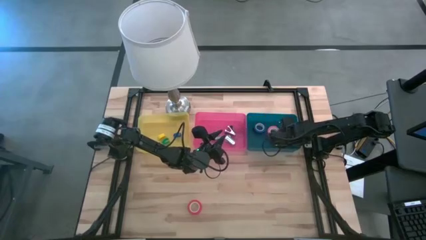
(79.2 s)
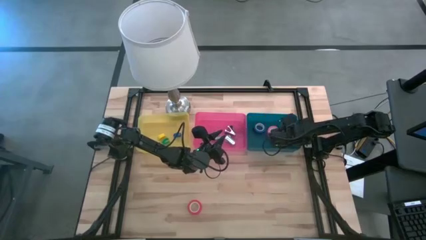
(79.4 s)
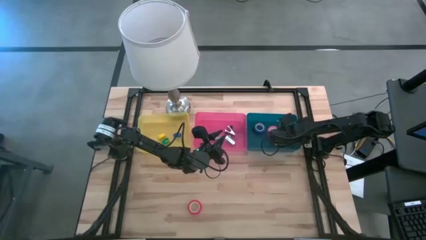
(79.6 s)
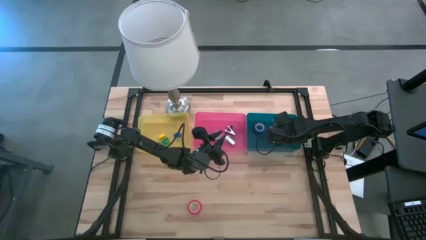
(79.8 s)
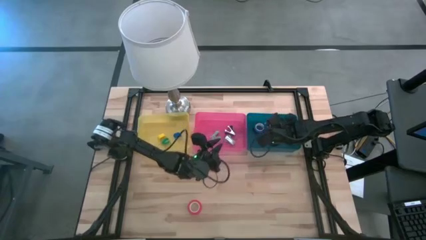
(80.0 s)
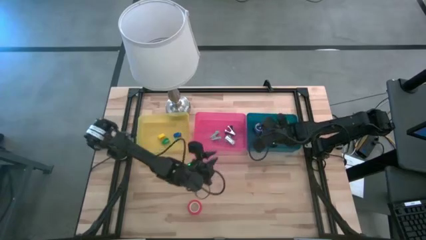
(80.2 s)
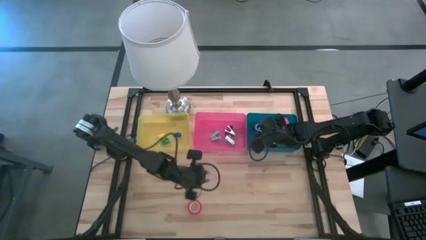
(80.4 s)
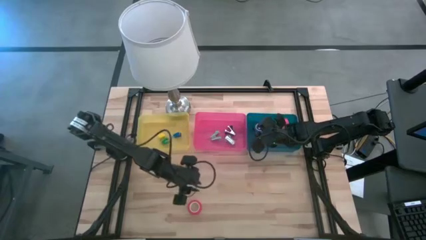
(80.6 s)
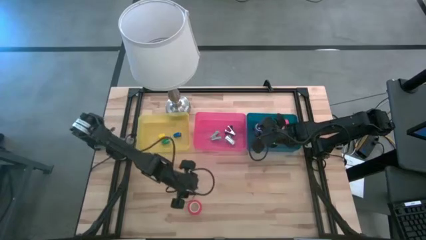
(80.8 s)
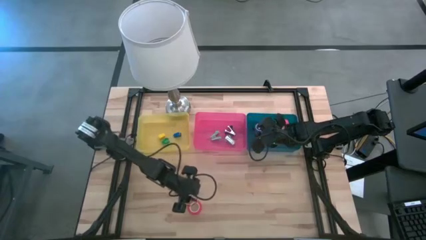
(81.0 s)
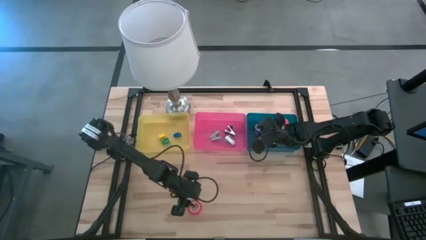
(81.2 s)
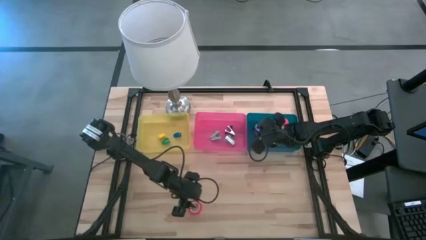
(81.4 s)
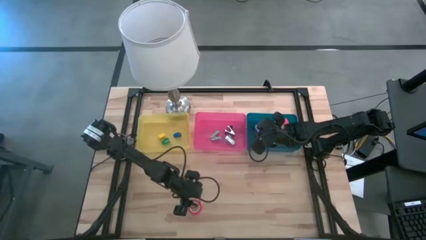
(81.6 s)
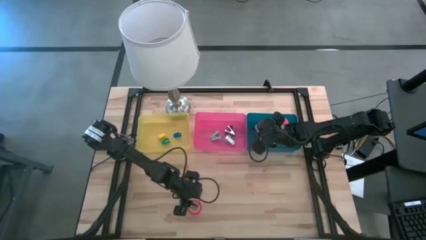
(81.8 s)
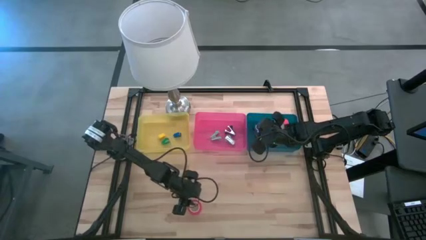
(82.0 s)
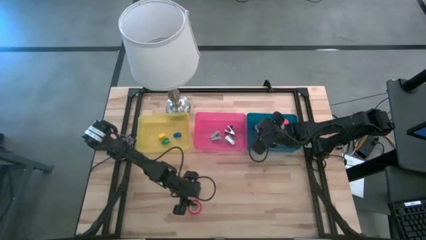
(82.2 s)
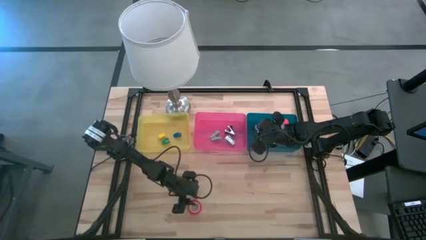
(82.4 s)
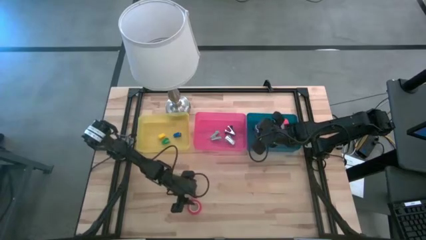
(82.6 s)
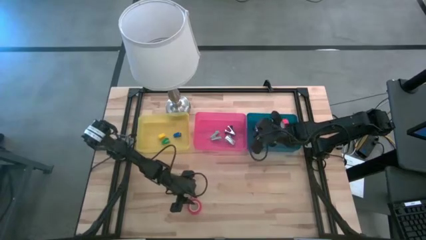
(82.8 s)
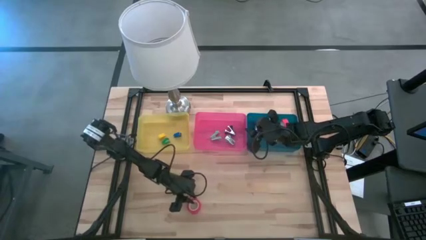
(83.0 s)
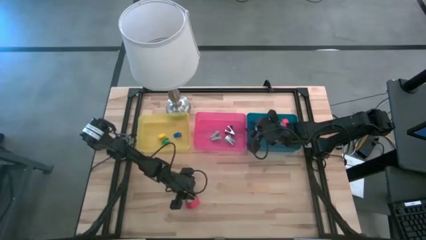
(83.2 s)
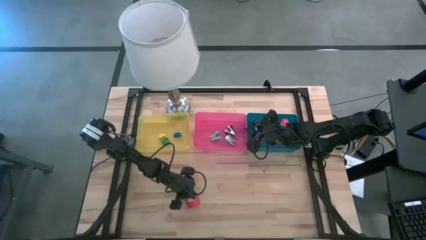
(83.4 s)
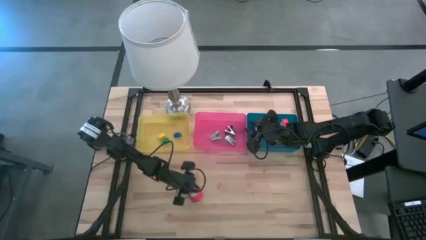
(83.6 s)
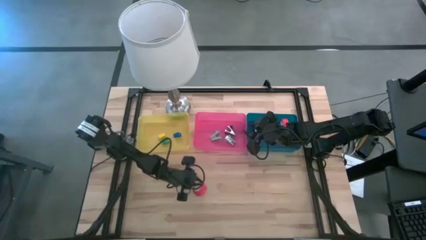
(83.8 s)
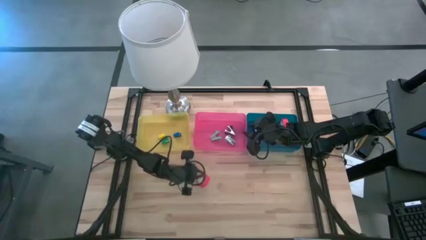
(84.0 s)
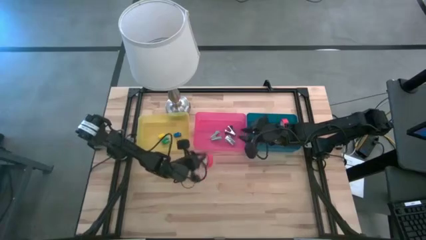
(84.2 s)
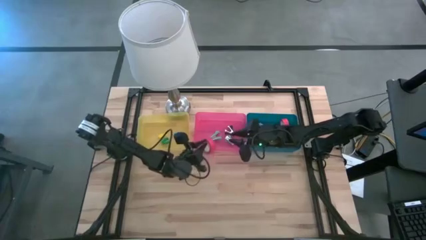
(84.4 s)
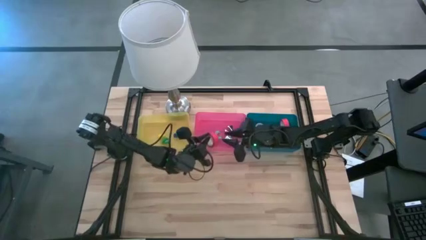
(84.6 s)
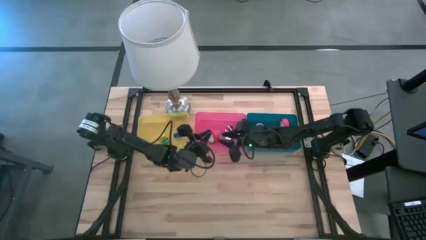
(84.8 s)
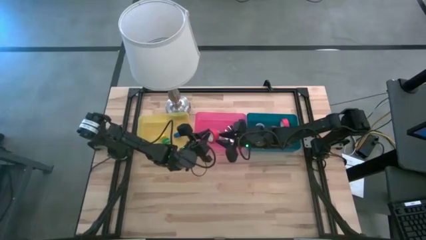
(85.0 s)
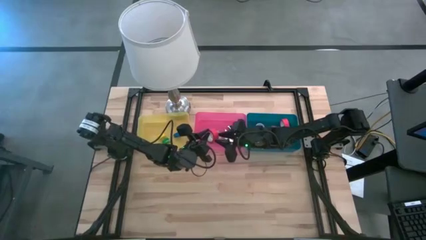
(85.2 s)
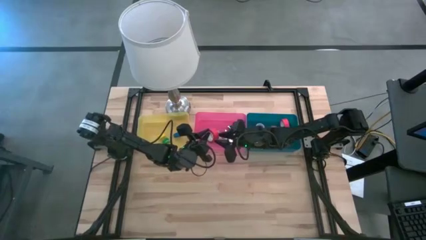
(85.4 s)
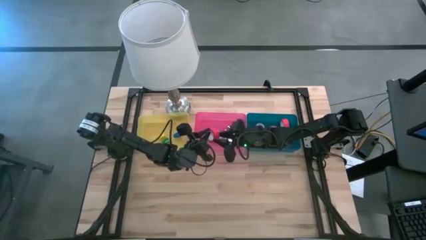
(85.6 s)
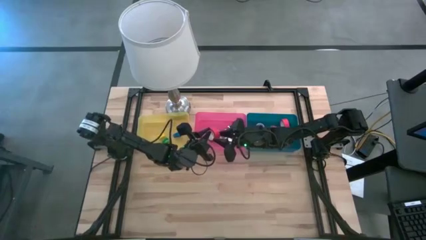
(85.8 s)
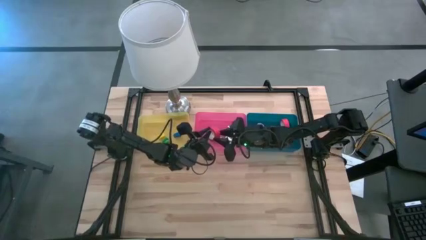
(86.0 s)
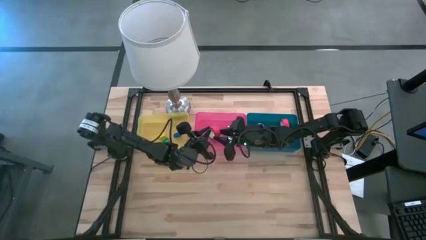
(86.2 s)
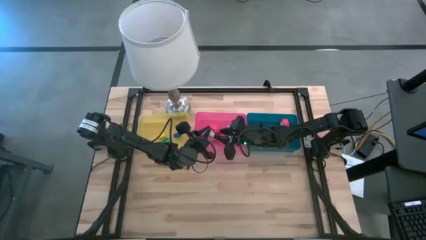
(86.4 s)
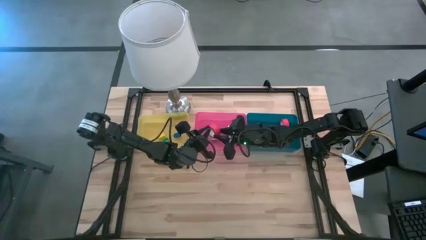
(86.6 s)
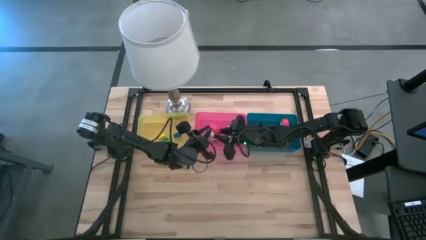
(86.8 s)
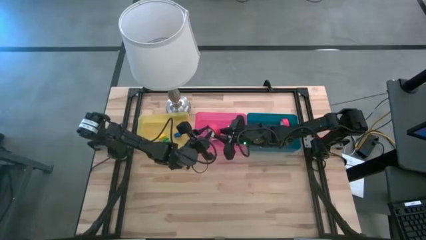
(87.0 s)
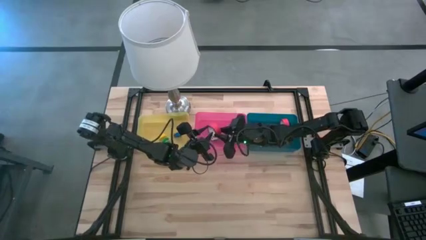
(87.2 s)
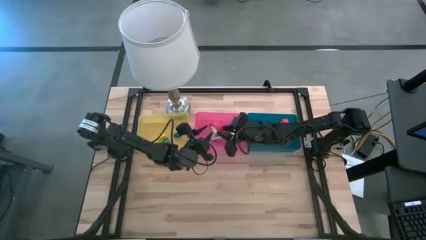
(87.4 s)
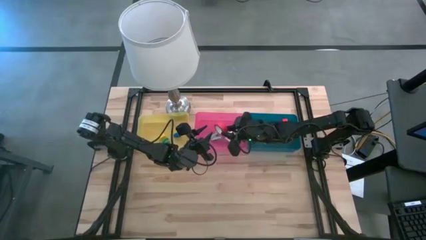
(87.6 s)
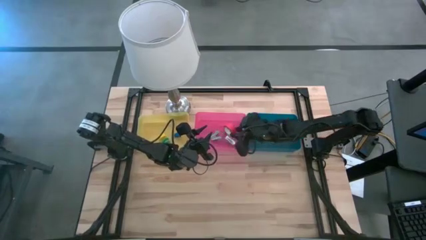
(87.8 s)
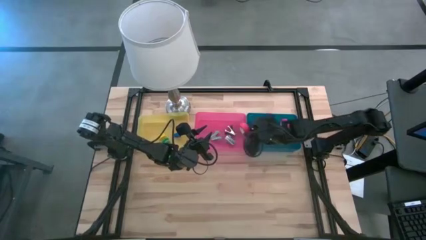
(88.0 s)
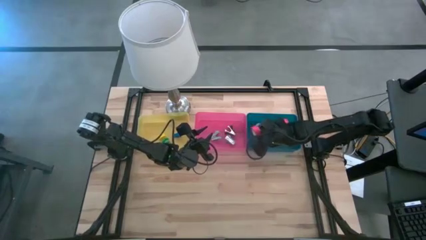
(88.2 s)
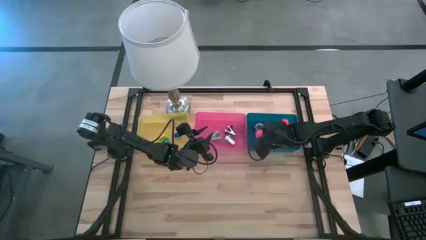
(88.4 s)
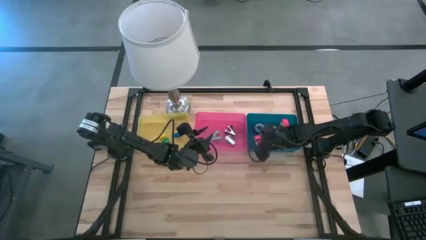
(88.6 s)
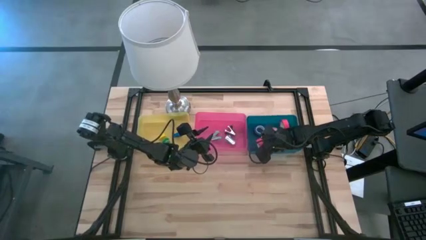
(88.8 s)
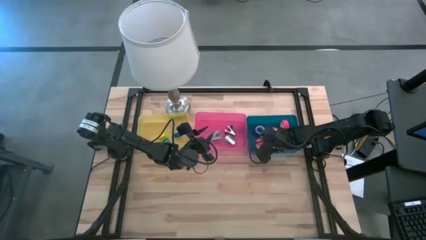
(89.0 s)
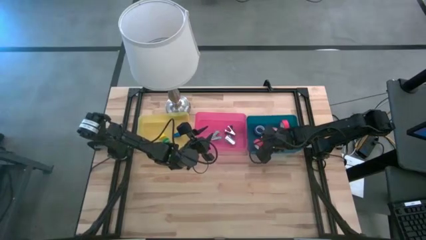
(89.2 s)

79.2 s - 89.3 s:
Task: Pick and place Stapler, Stapler remover, tape
Put the orange tape into the blue bin

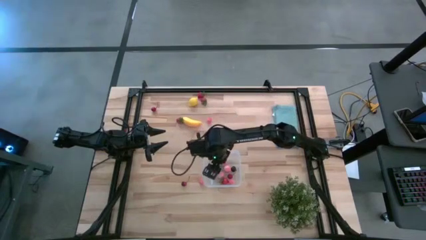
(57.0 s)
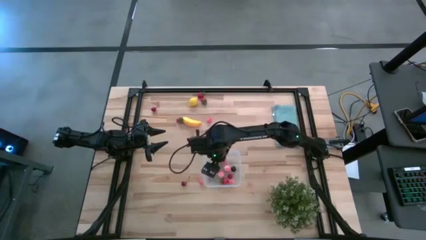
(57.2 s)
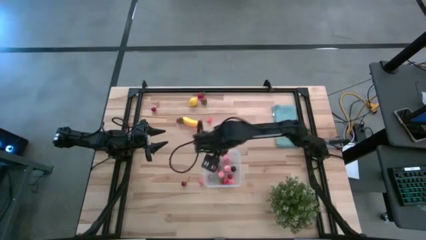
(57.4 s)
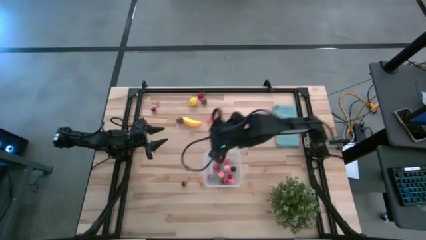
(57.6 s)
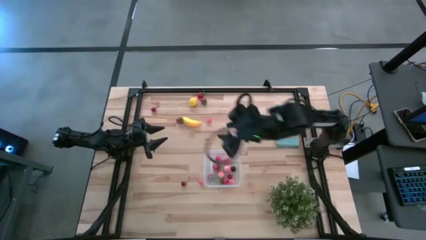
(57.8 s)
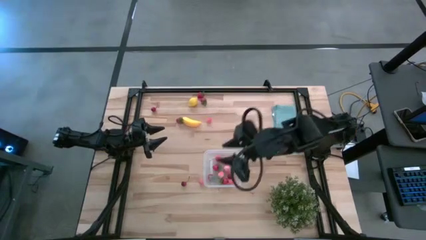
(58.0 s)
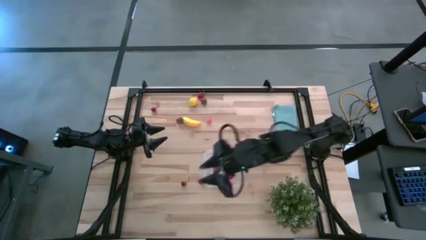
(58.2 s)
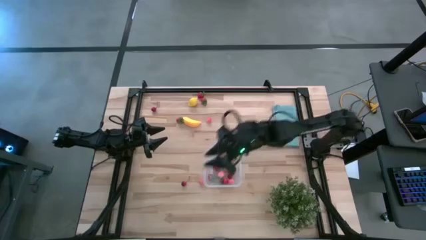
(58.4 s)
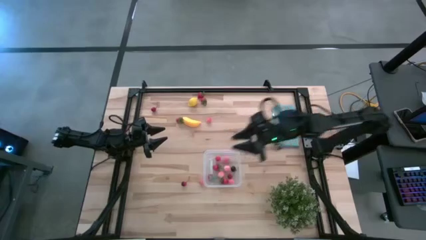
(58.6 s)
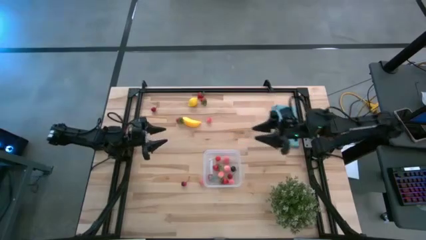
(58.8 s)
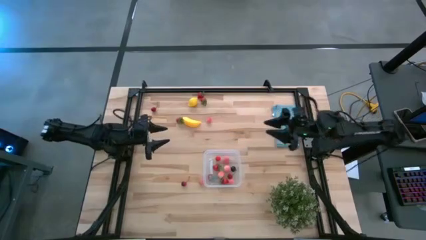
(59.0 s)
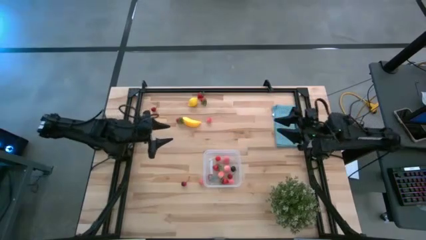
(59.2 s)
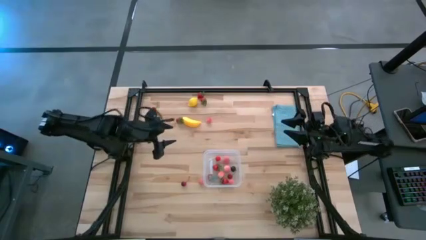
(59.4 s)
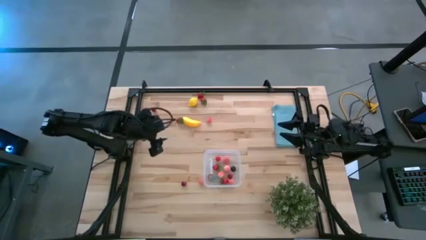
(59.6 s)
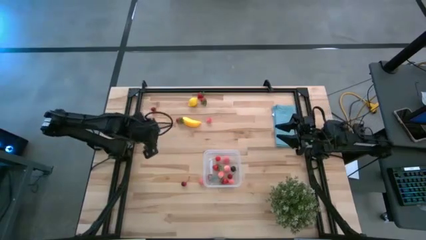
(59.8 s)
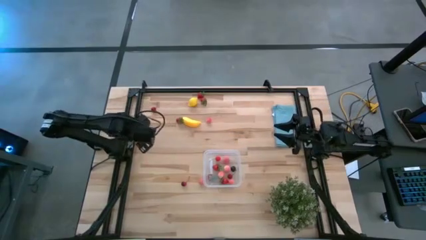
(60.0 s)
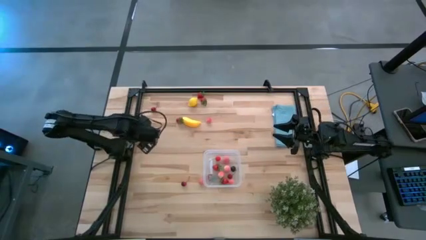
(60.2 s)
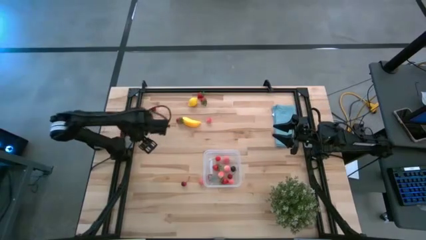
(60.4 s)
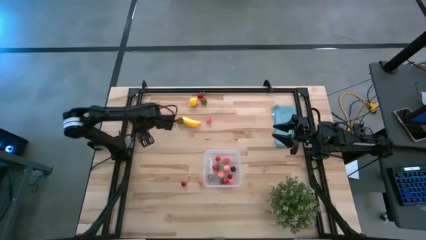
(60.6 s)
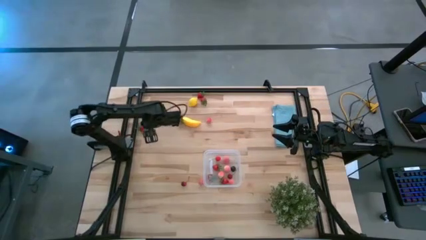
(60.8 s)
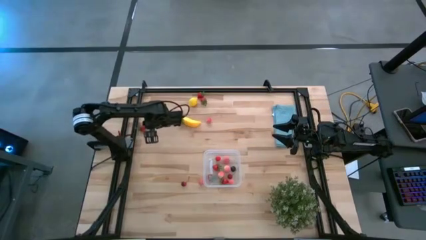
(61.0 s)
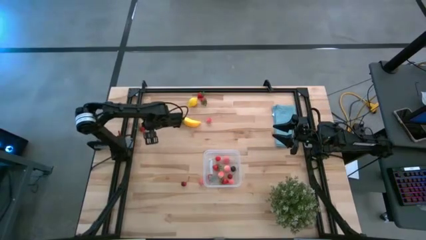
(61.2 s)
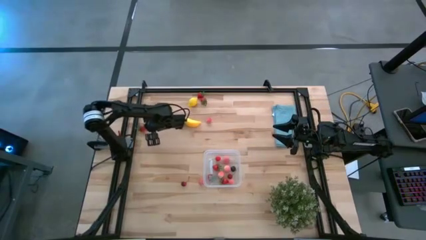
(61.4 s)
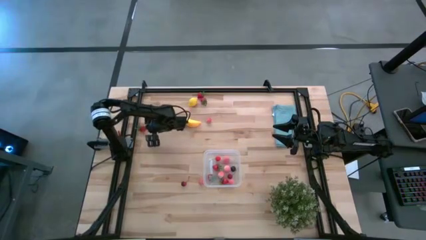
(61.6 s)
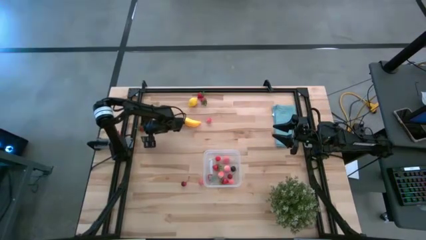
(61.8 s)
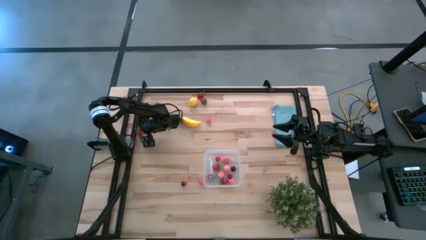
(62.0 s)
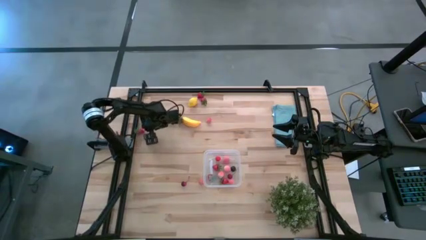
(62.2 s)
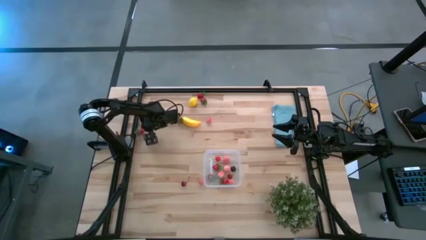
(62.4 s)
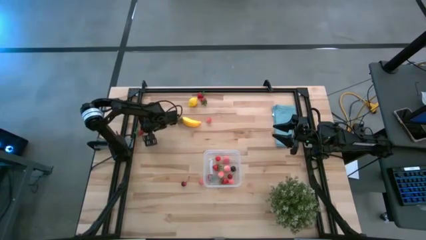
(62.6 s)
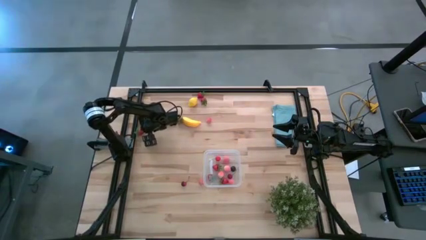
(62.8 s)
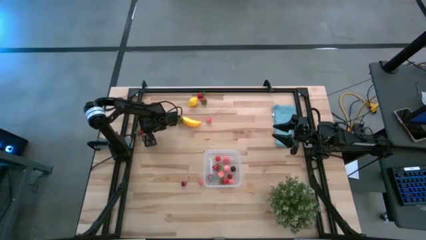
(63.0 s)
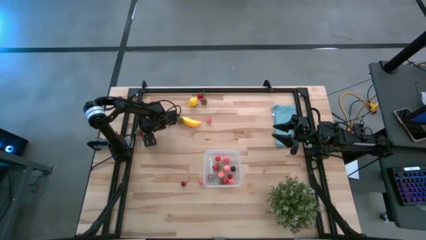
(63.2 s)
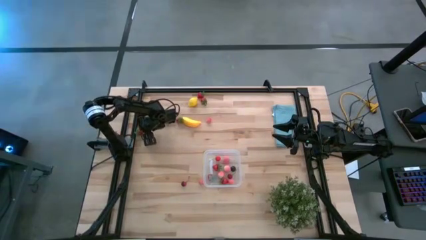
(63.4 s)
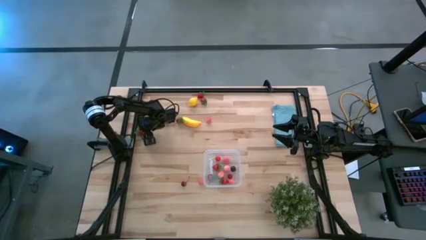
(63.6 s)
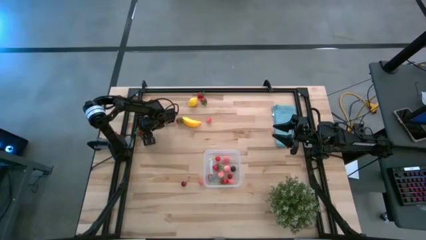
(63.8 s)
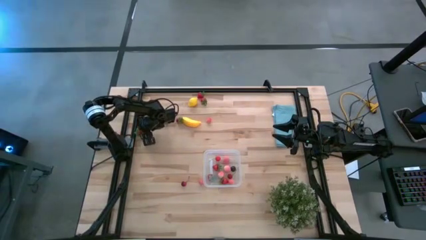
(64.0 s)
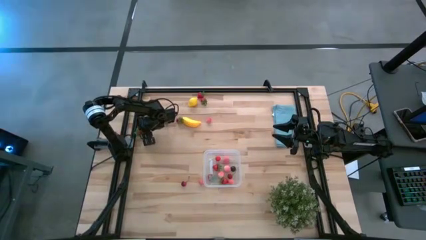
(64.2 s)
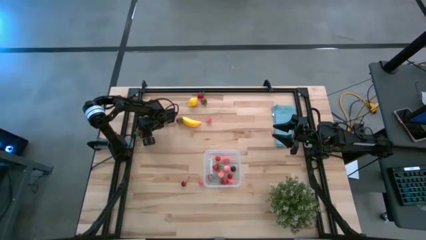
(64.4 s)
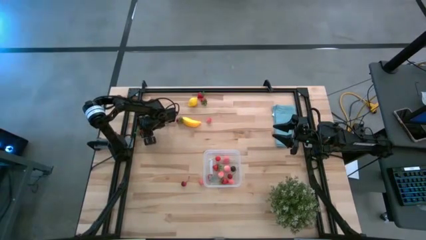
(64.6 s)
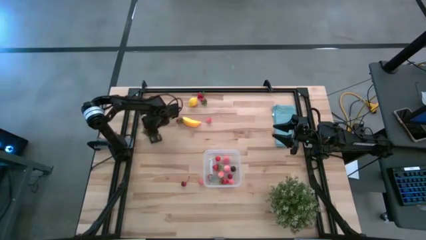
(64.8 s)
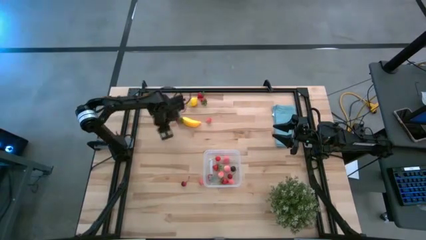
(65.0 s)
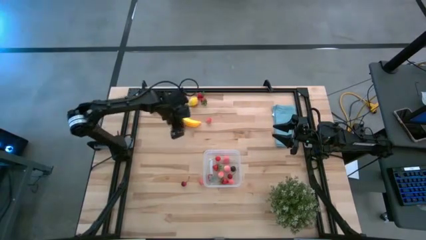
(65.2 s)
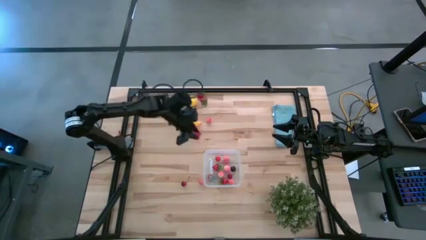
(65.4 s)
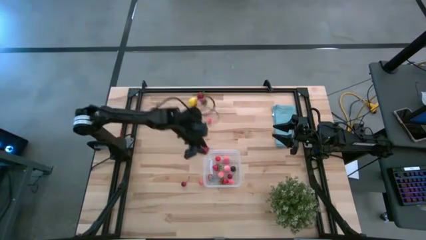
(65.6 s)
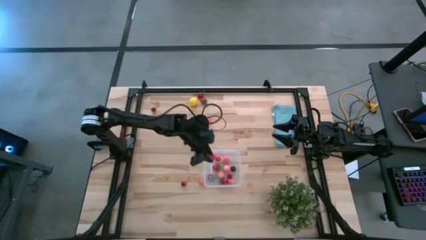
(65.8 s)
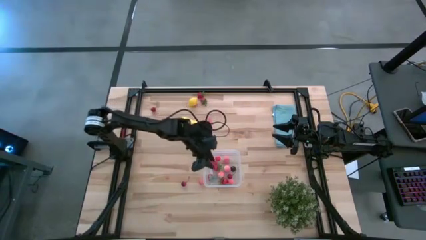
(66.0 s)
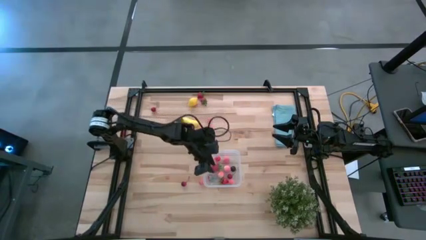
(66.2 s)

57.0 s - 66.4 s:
Task: Pick and placing Produce into tupperware
Put the red strawberry into the transparent bin
